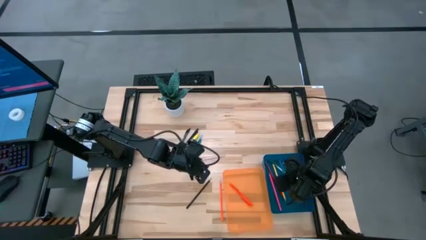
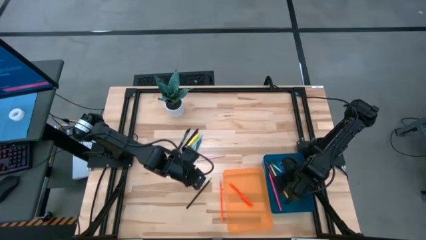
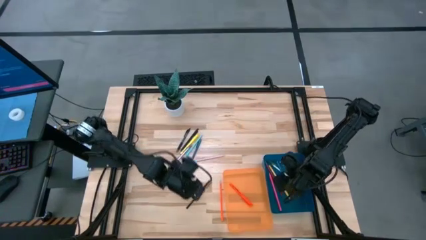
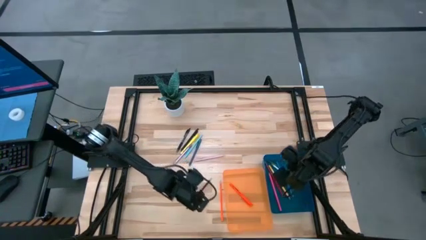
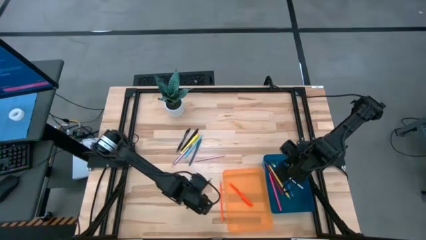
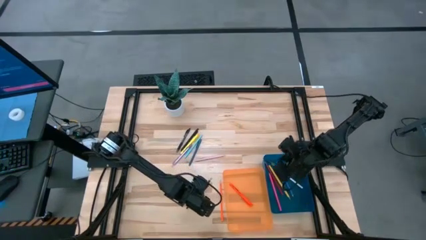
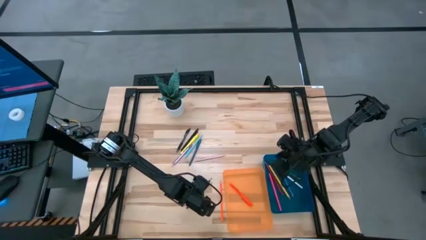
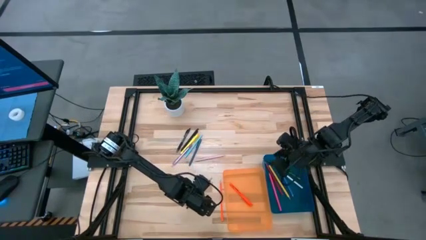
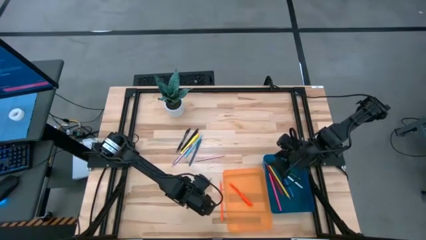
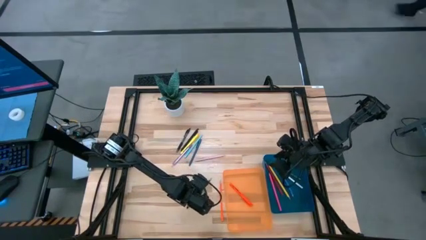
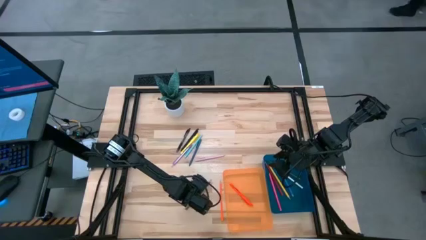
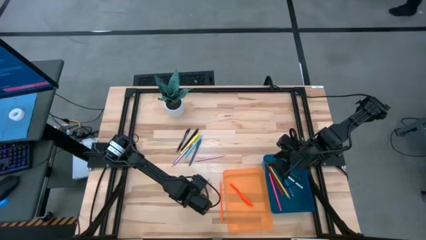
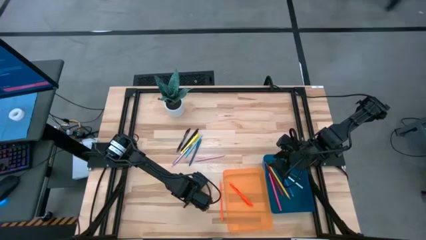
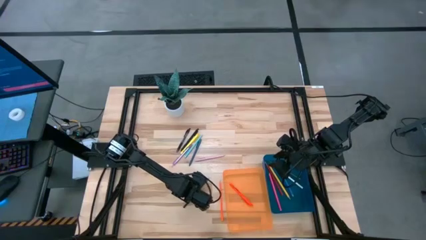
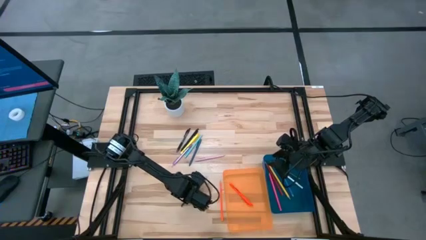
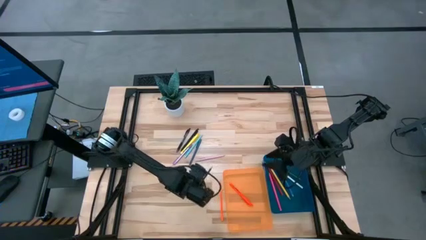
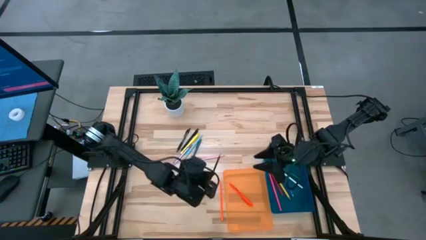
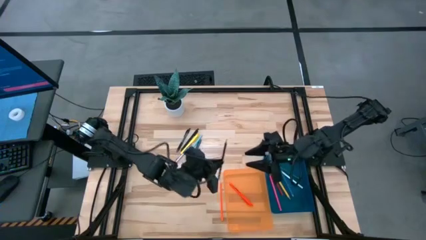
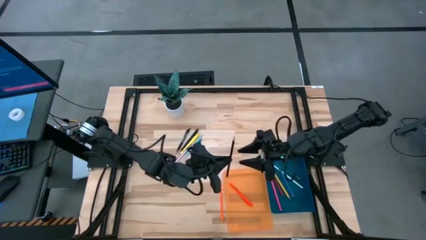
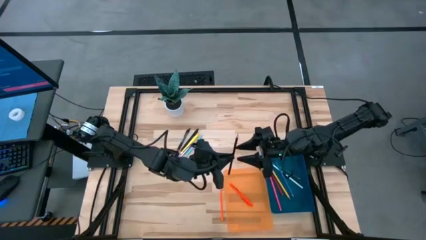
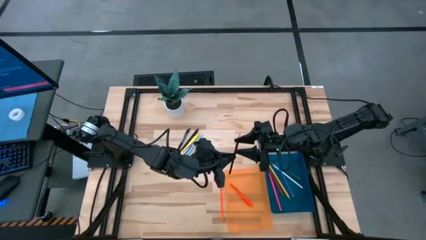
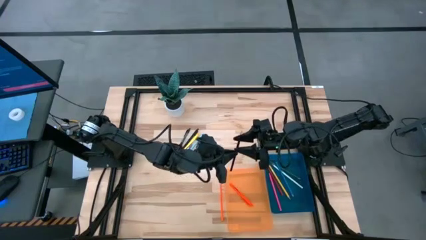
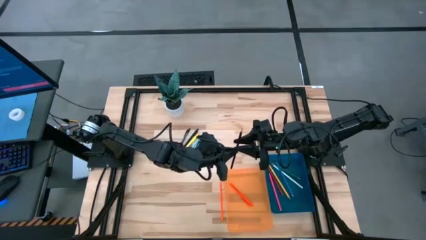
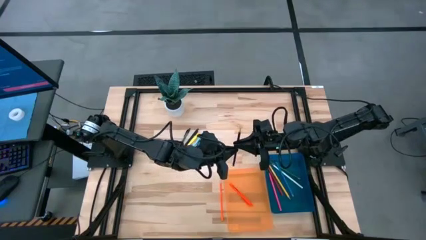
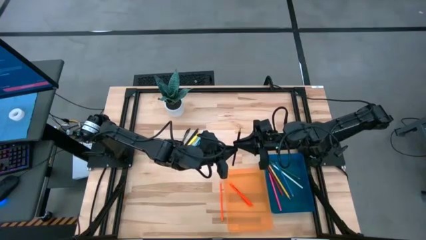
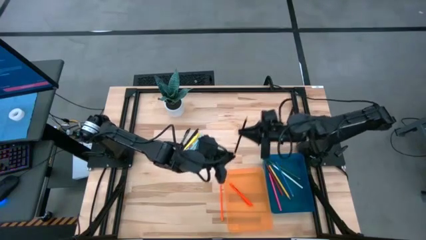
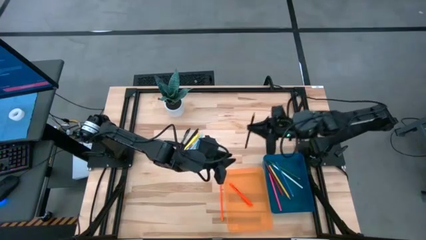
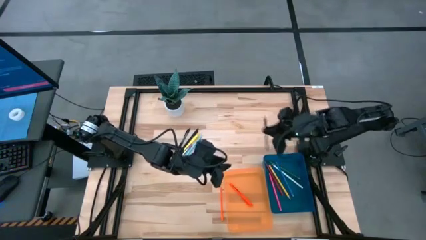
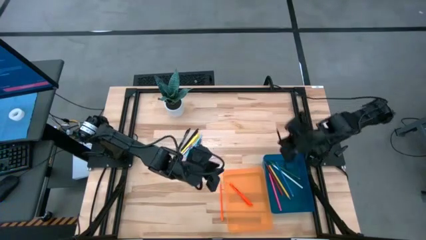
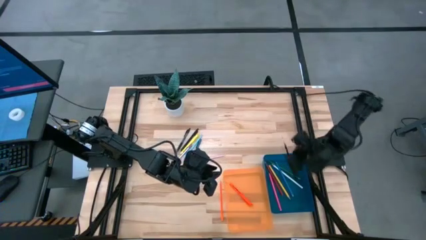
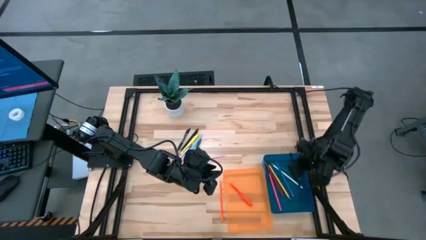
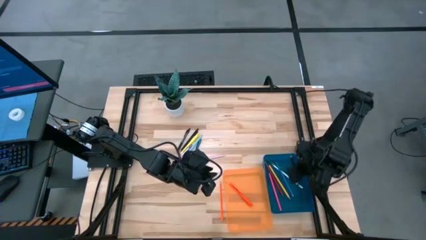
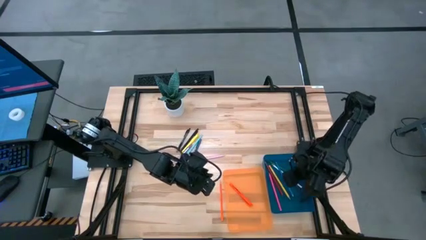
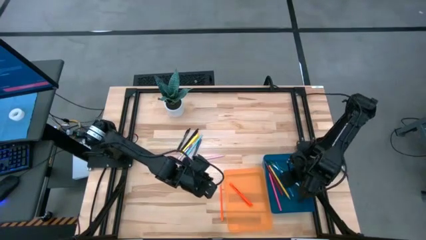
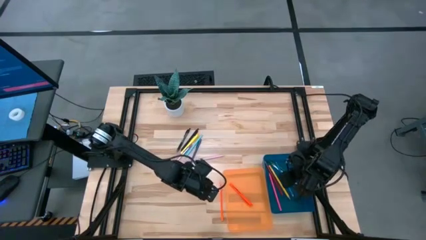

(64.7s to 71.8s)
Task: Sort pens & pencils
Put the black pencil into the blue bin

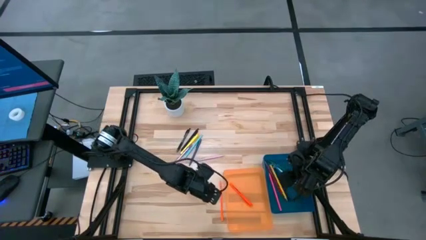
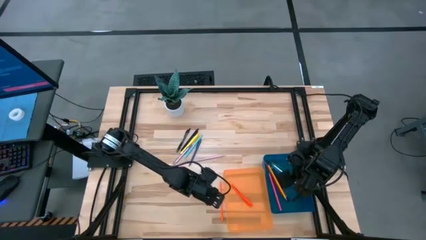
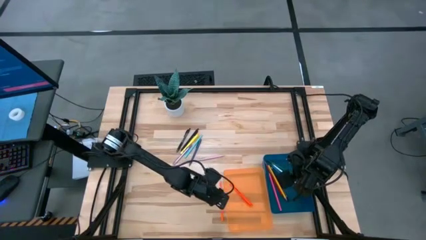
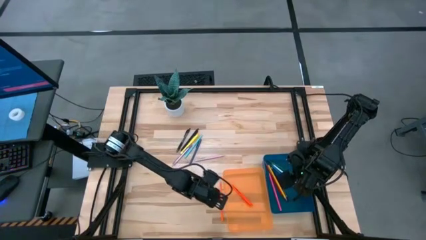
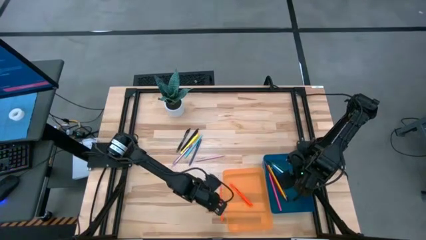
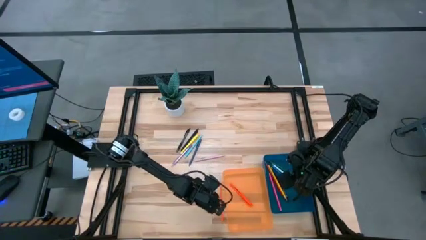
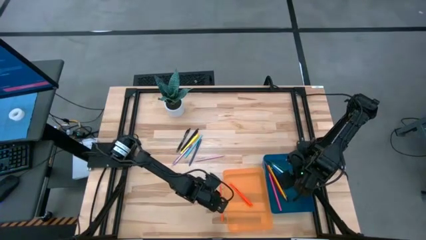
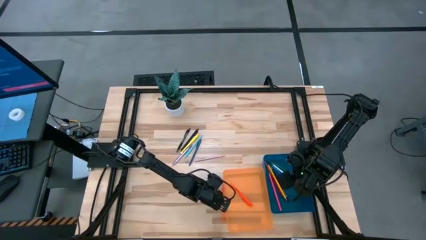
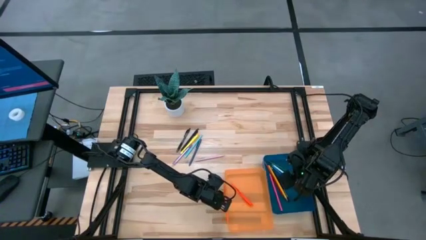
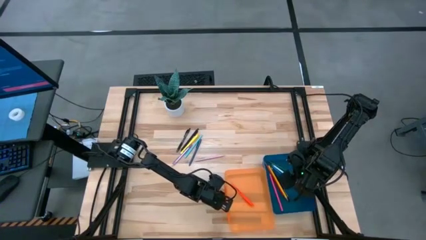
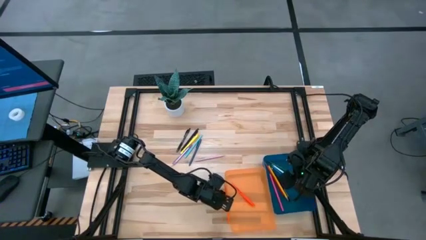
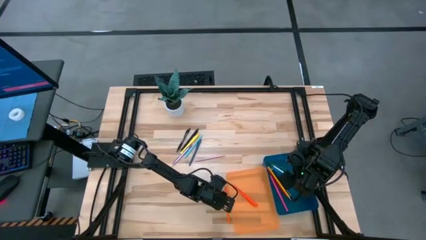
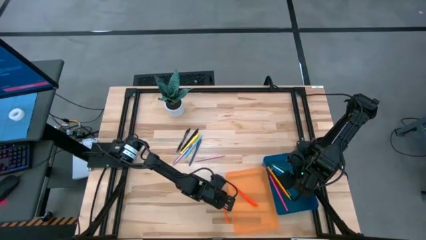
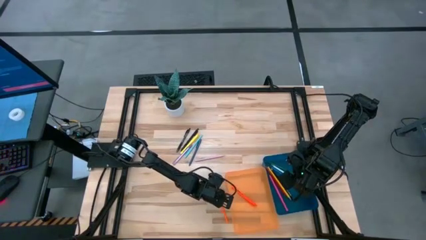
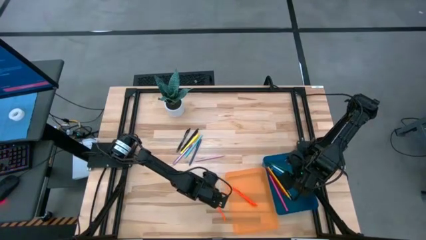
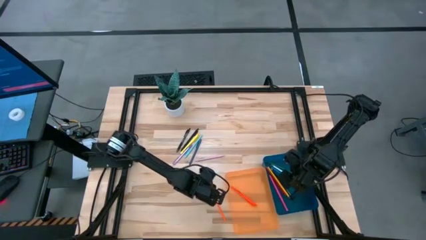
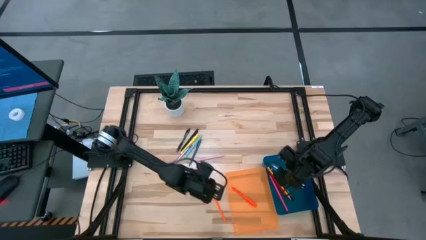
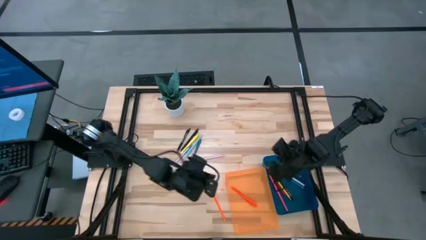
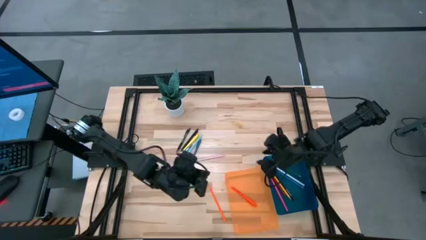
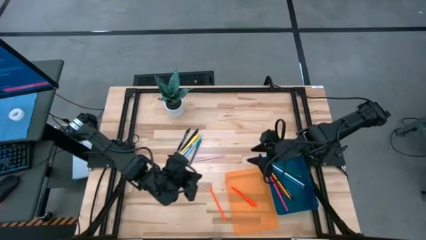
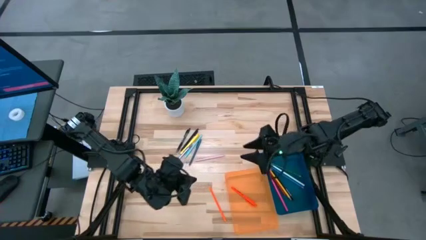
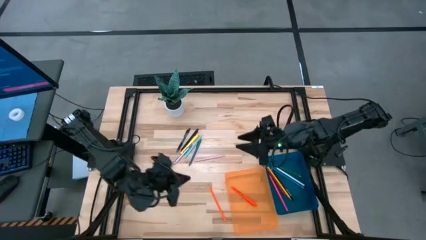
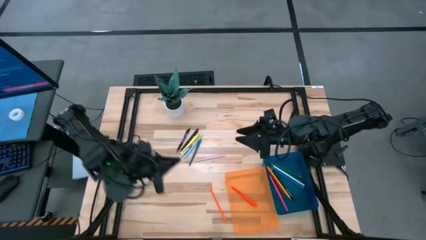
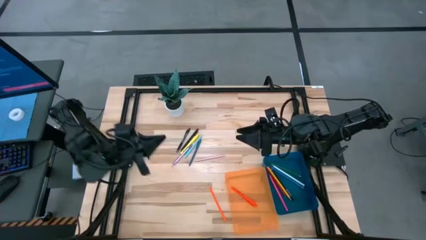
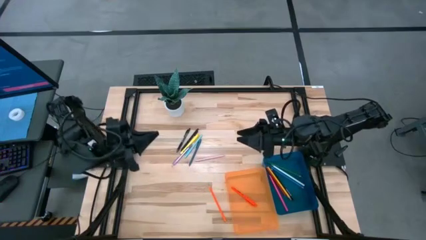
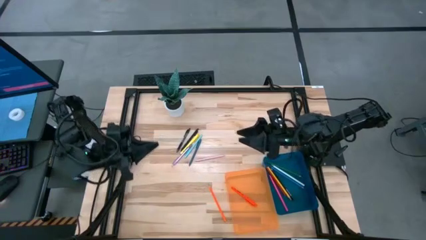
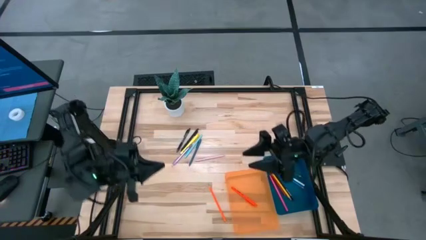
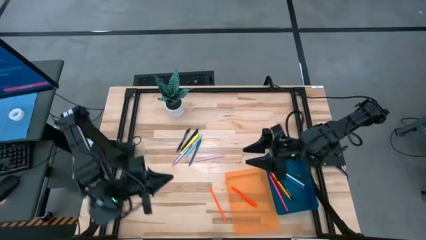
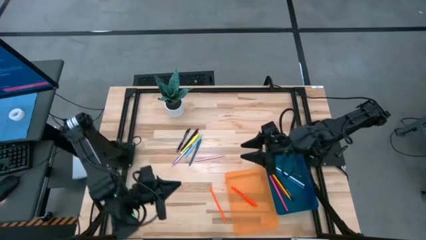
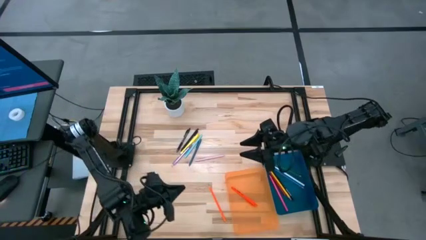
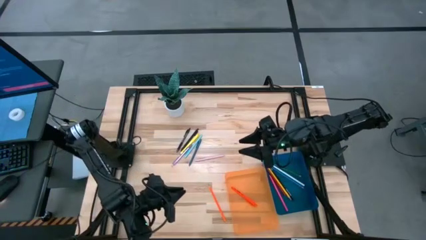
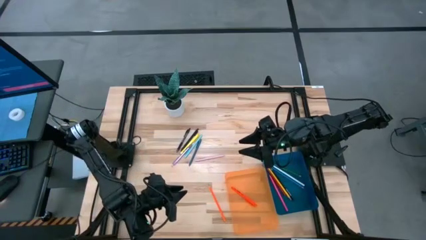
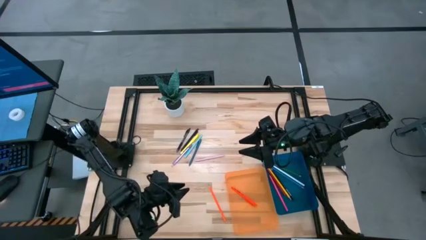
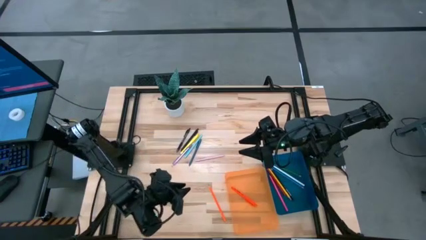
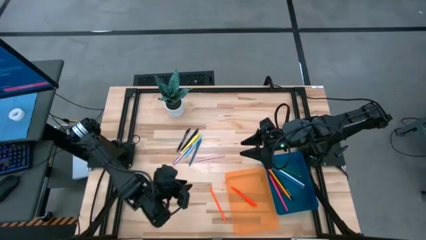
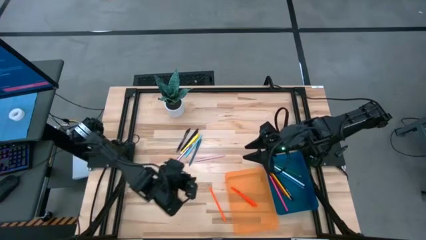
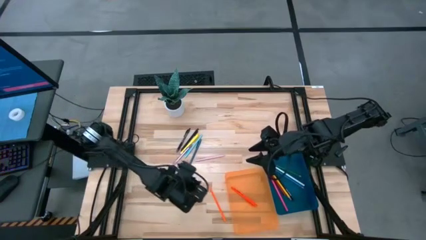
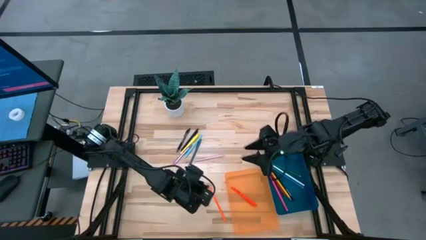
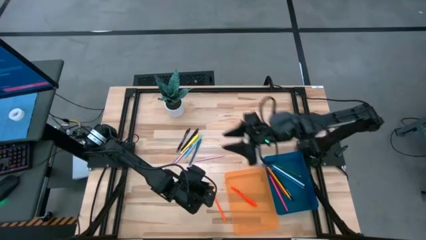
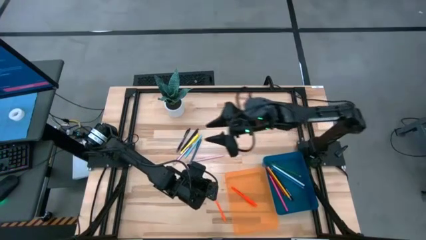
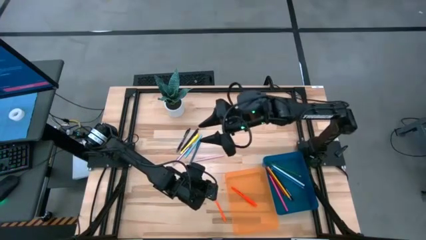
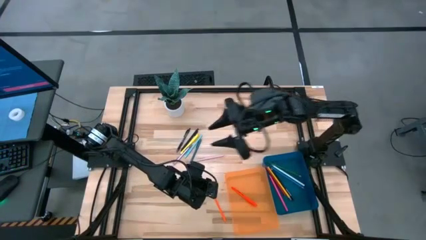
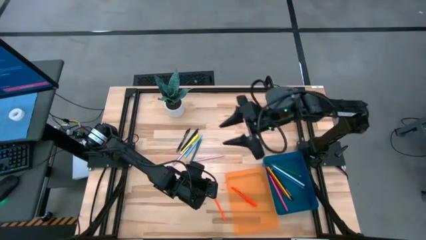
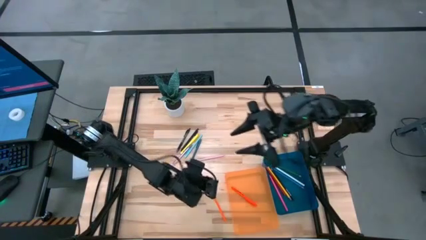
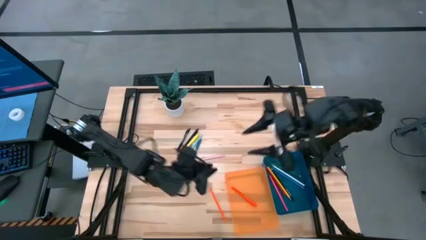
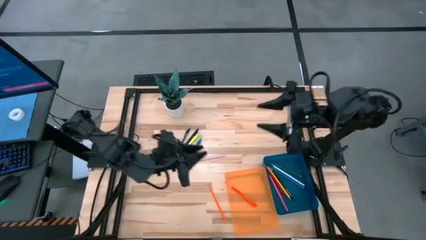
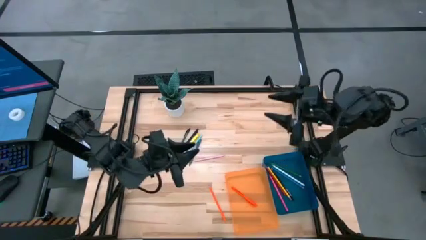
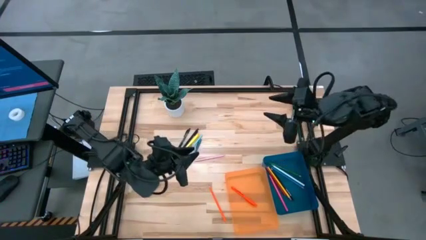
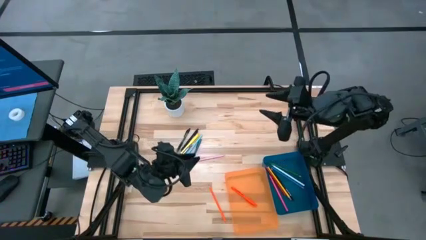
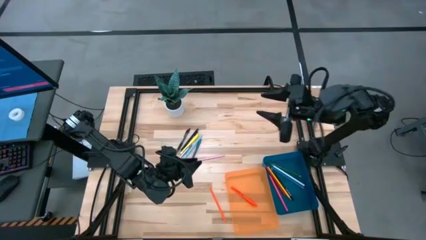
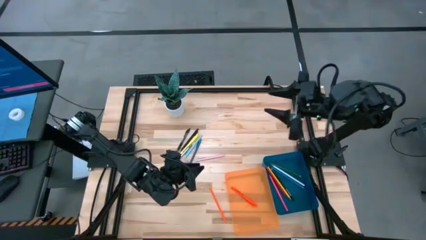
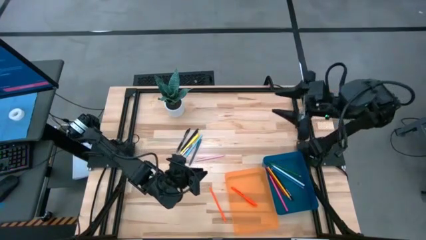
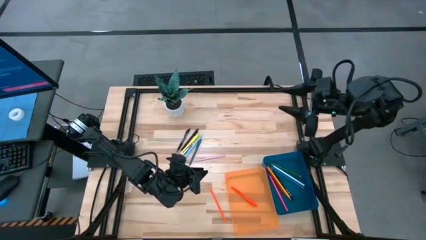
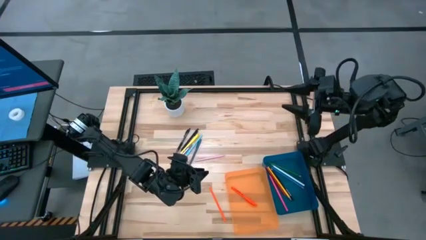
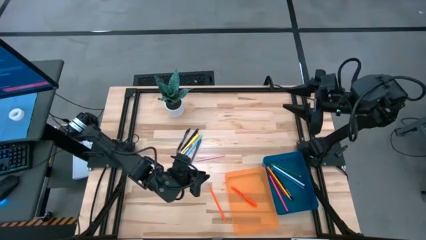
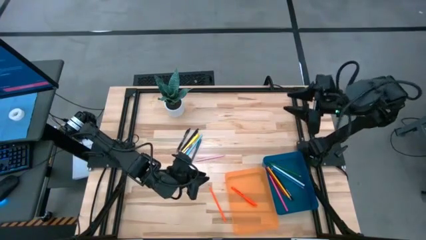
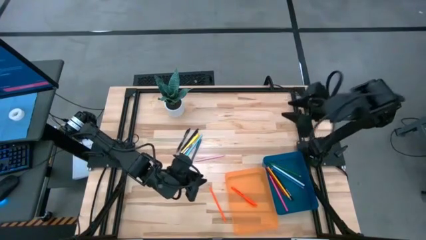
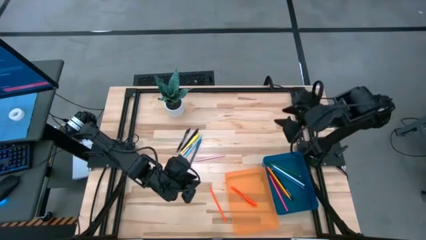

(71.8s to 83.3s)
Put the orange pencil into the blue bin
